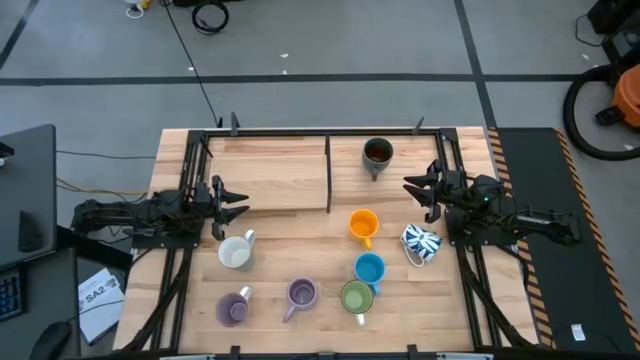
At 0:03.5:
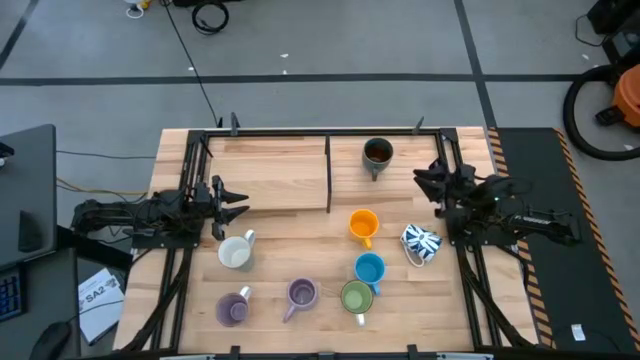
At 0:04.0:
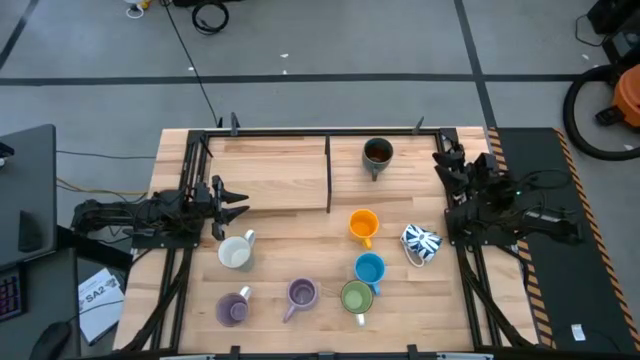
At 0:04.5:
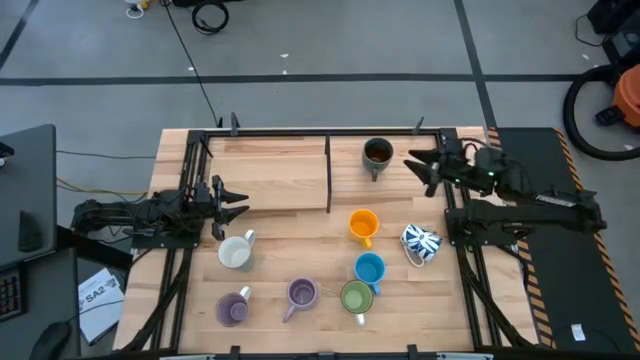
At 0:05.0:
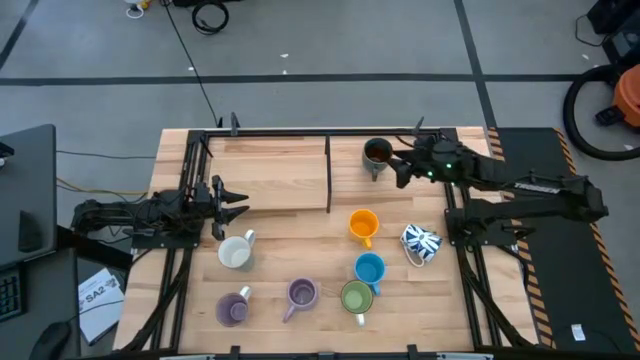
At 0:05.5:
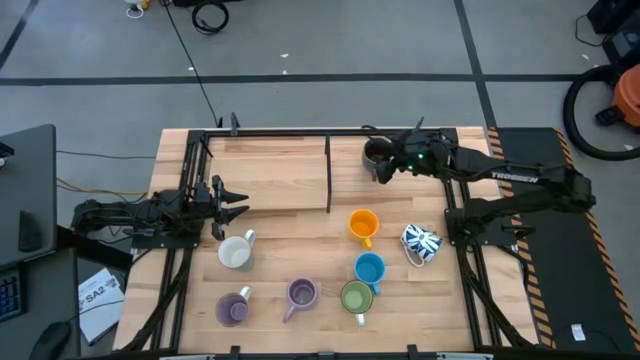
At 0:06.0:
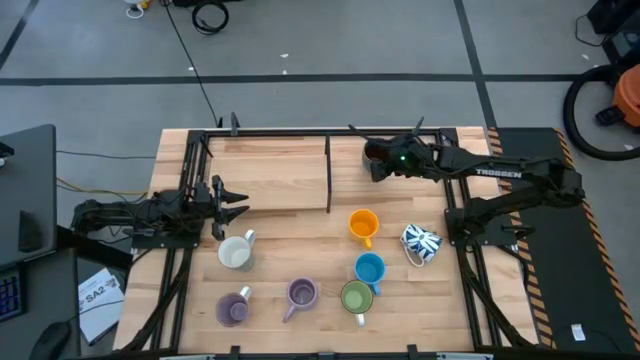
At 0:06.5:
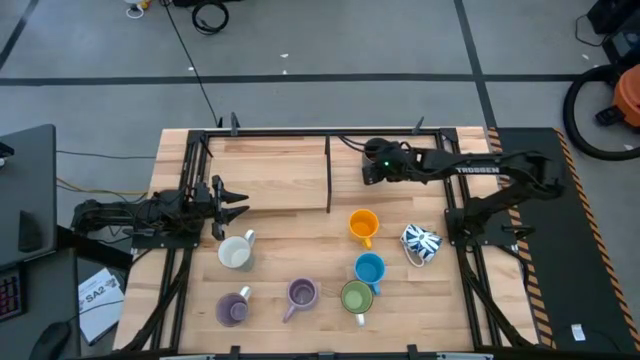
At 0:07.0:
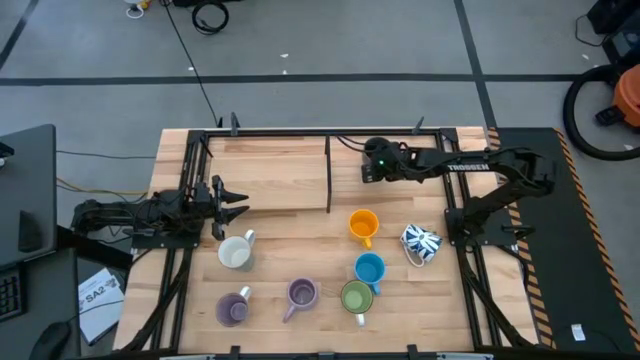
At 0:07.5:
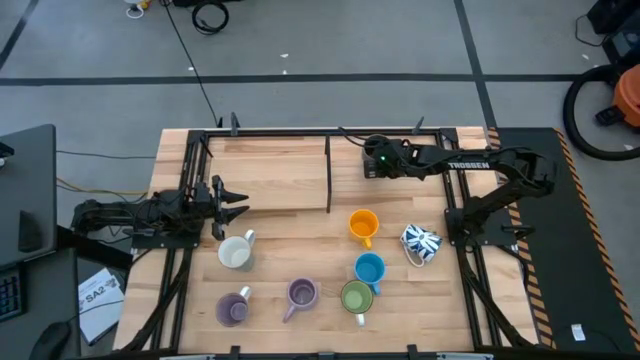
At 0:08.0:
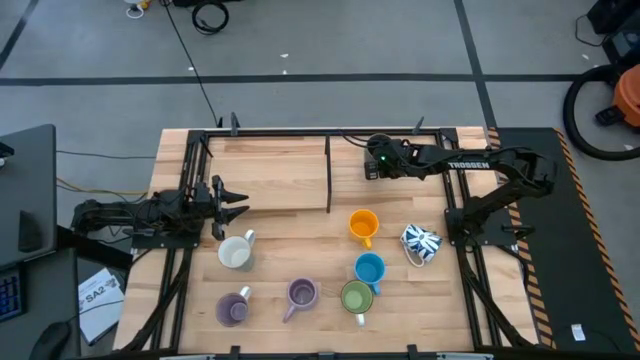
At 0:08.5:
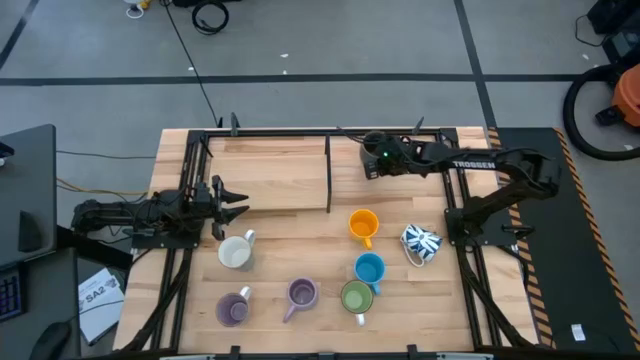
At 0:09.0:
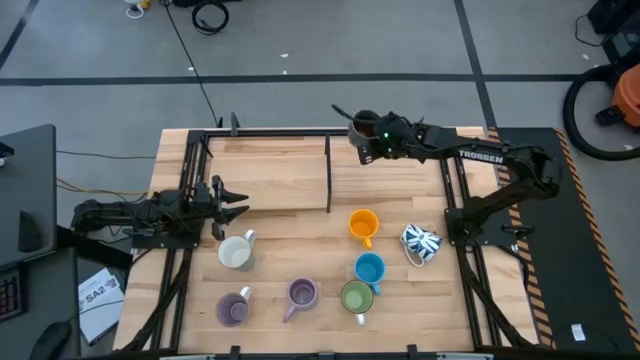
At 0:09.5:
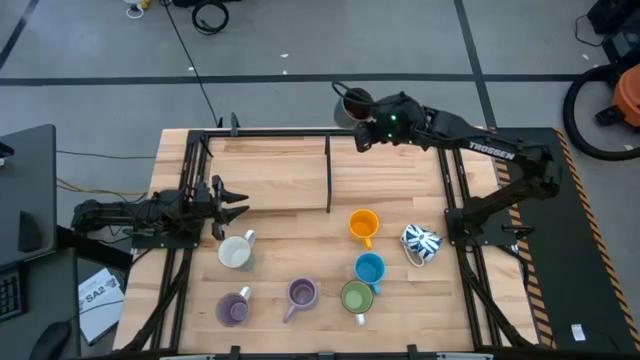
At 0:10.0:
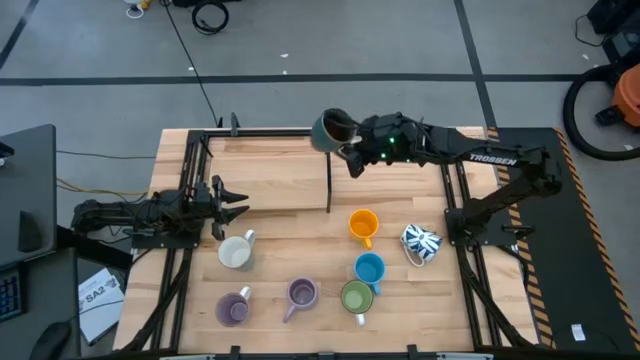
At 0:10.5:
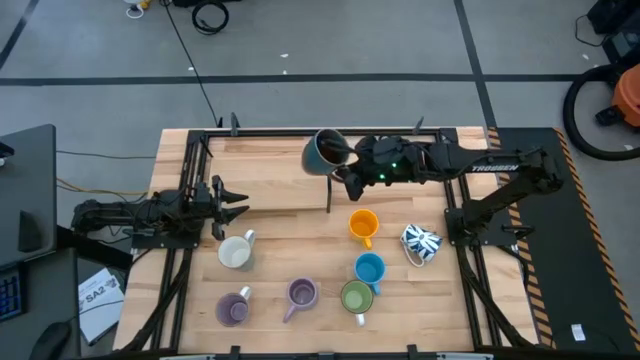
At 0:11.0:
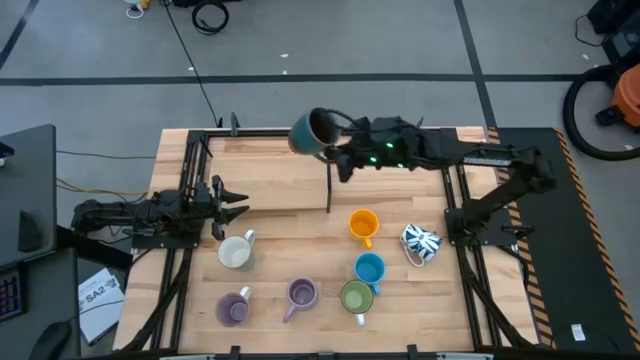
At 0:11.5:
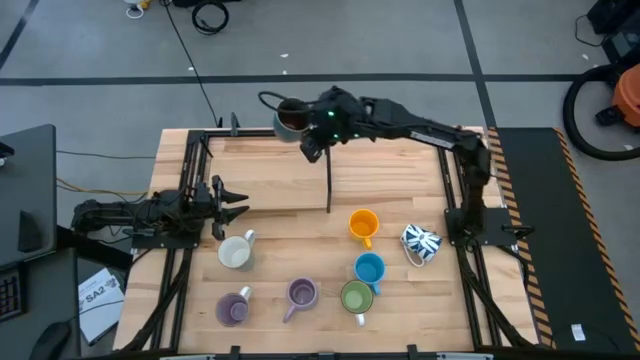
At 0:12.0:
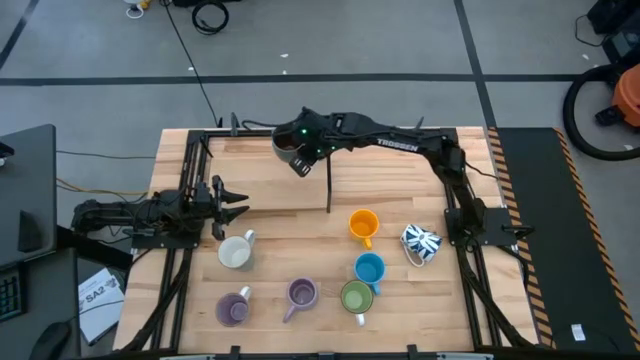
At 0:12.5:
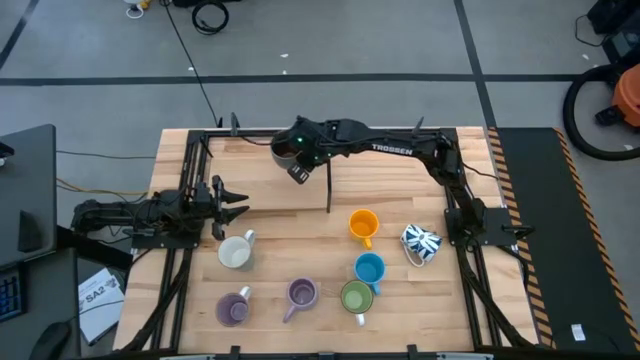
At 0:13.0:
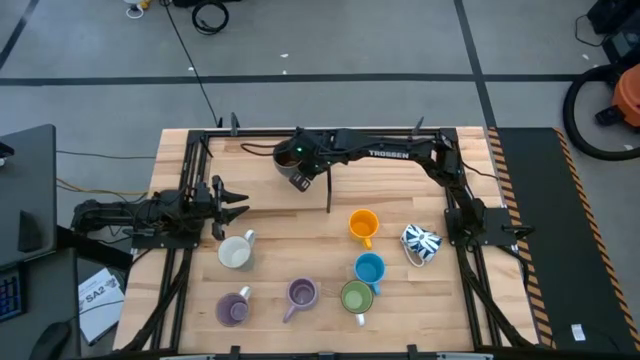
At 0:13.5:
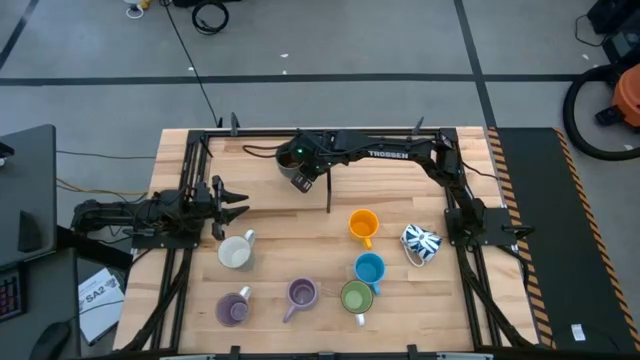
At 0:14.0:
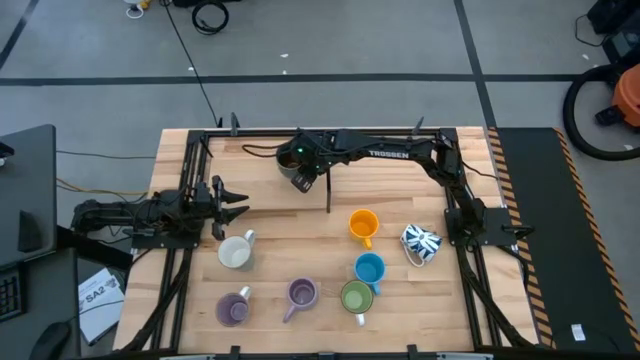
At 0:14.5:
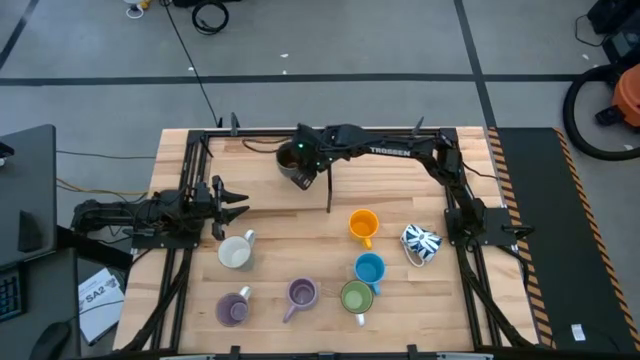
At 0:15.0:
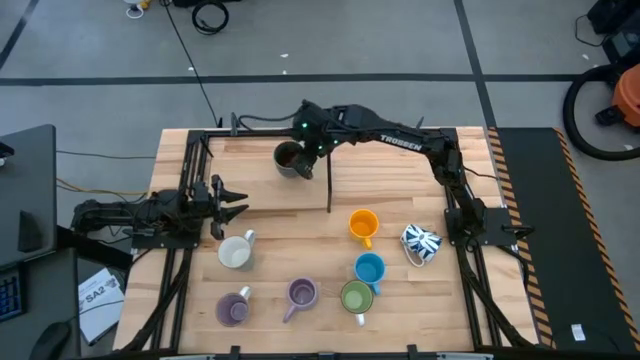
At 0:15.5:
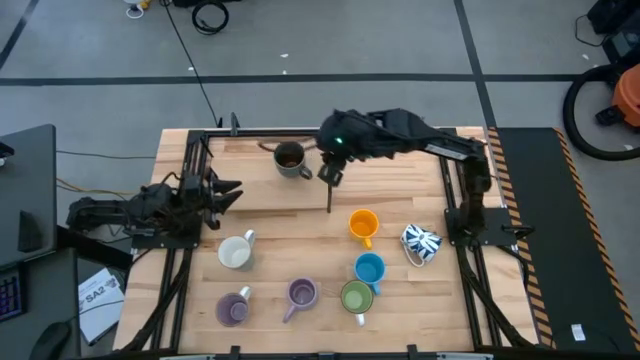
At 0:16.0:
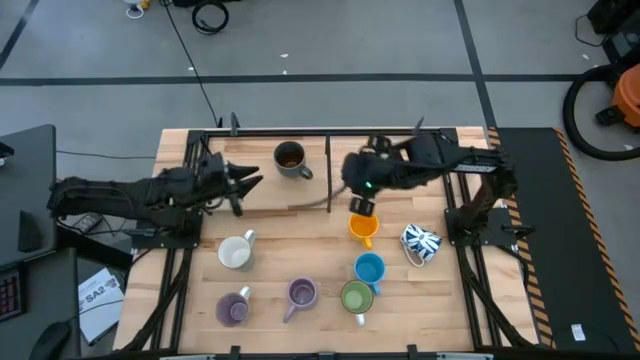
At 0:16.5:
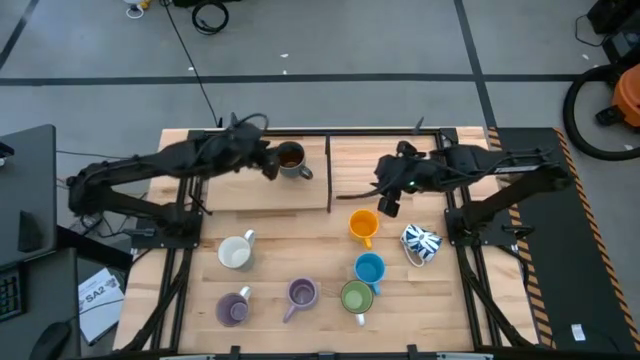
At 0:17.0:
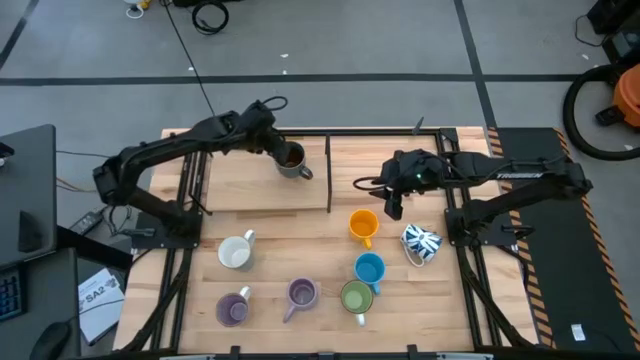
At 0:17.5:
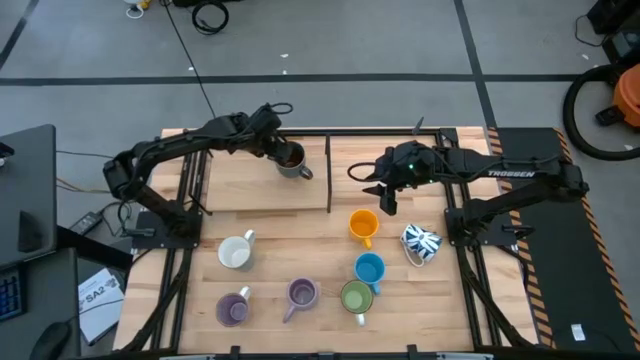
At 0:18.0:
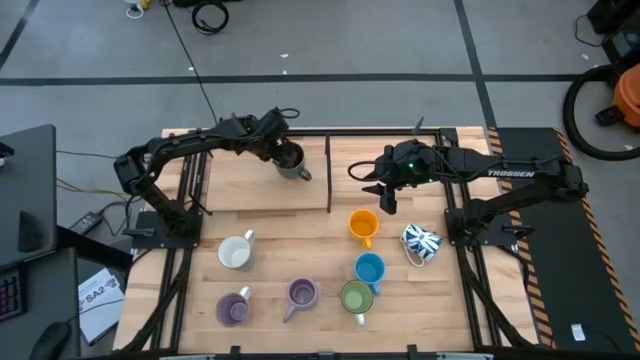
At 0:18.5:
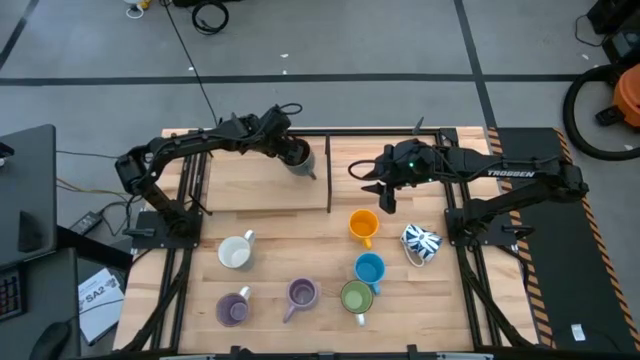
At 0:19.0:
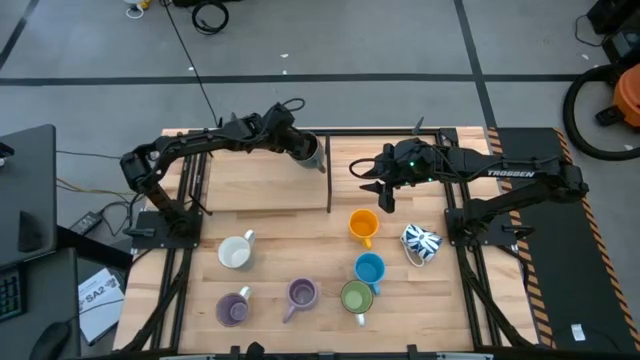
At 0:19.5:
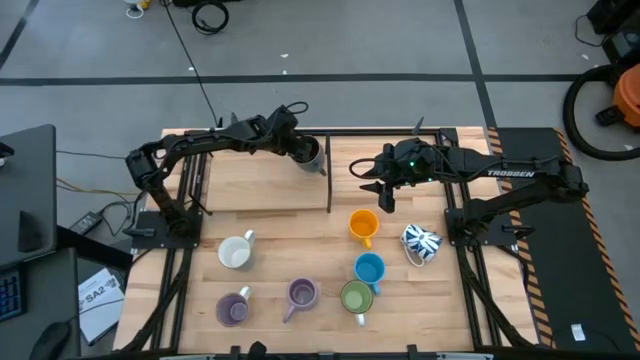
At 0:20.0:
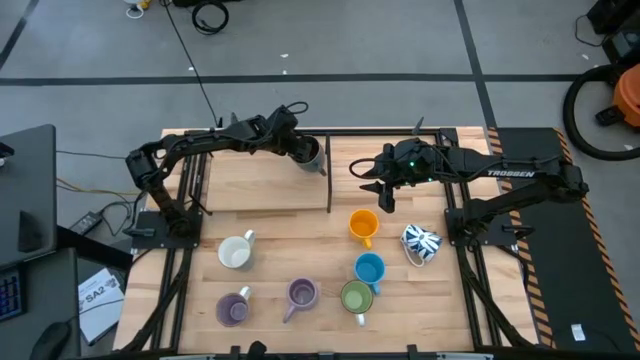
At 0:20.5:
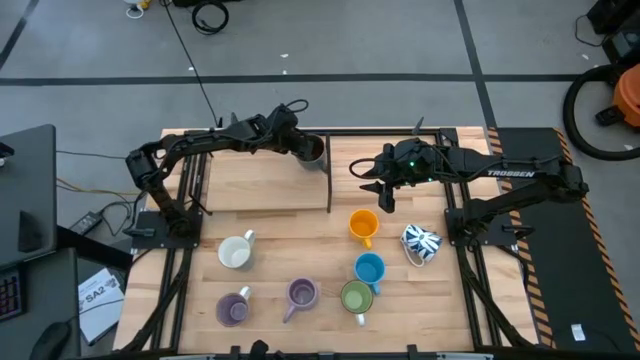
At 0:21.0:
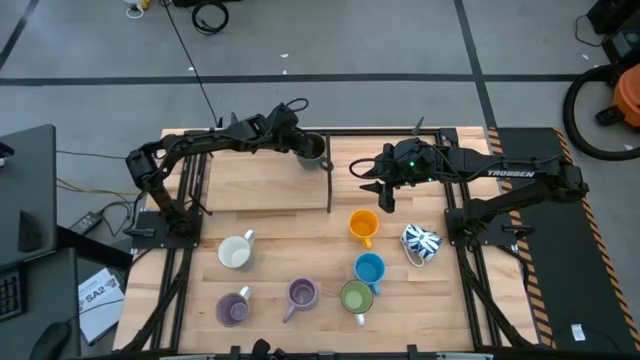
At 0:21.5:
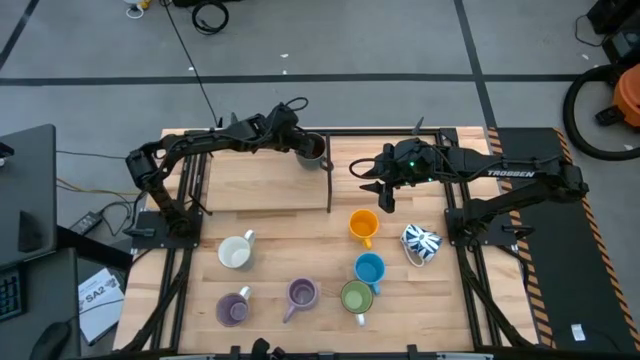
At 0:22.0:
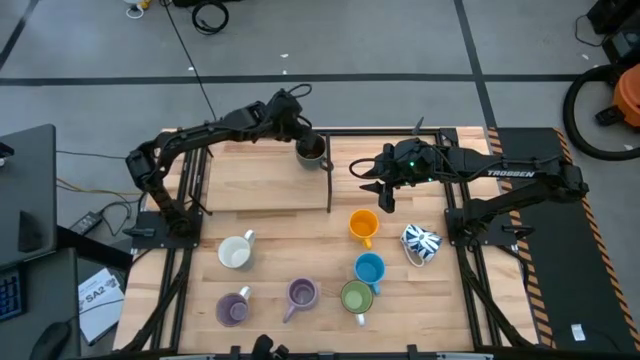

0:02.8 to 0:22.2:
Task: Place coffee mugs
Put the dark blue mug on the shelf

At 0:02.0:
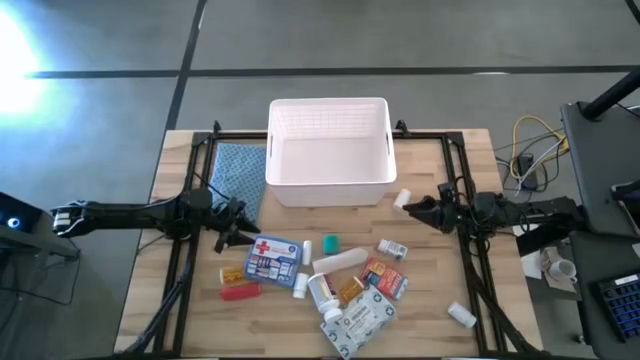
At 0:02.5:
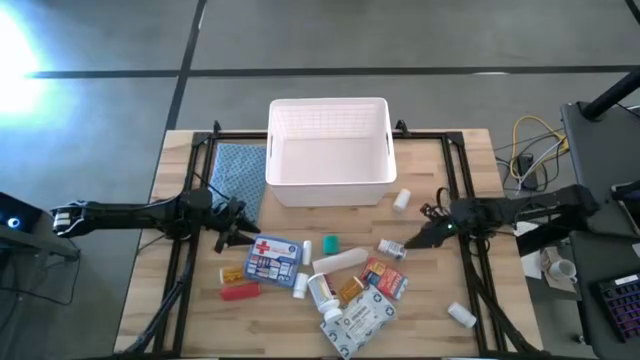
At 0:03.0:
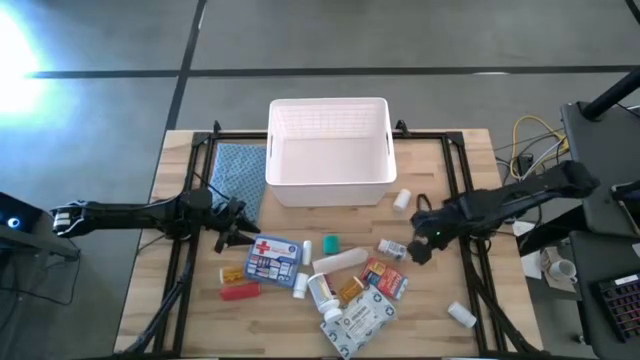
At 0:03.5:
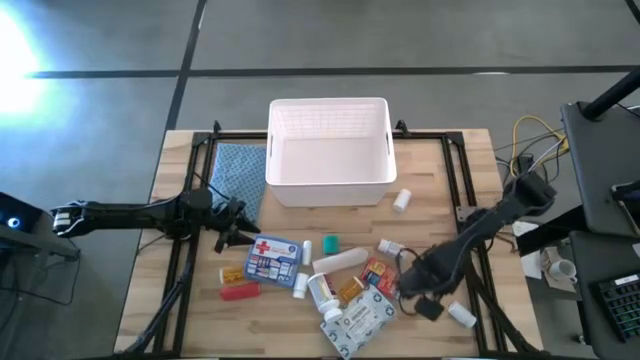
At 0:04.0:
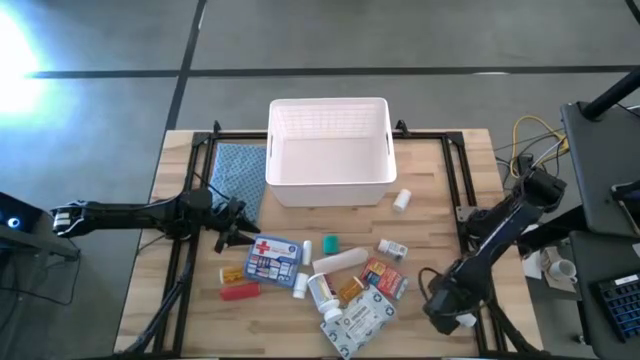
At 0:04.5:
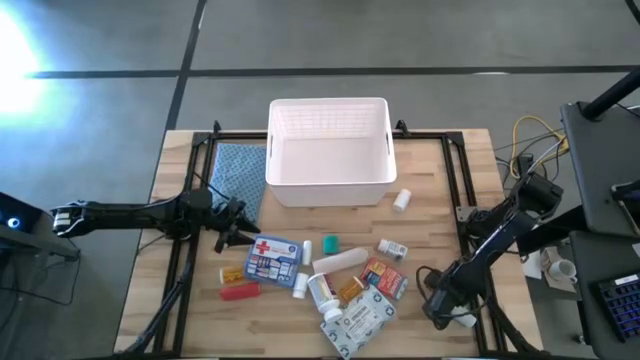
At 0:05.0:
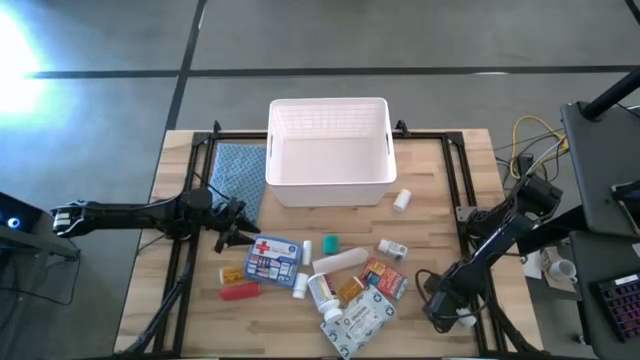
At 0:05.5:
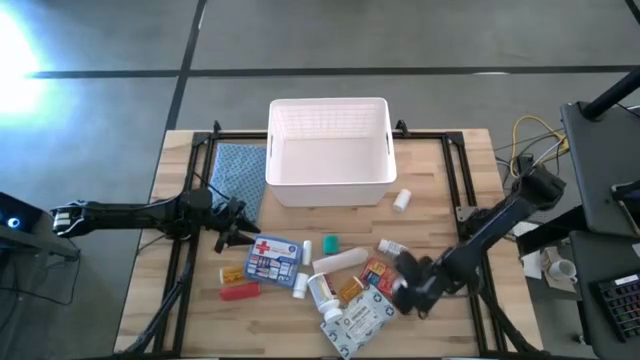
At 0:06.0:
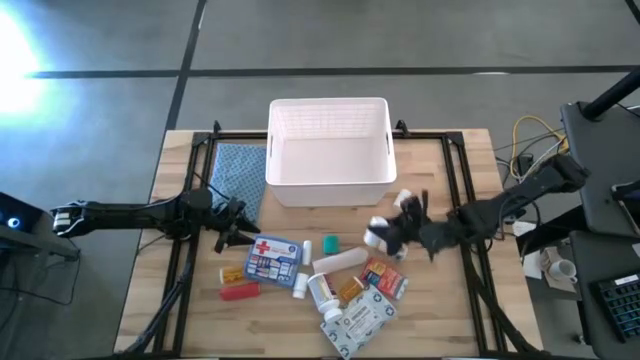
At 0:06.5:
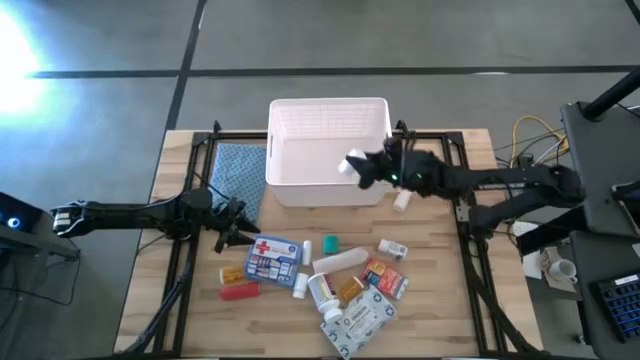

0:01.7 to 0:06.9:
Task: Pick & place medical supplies in basket/bin
Put the white pill bottle into the white bin
